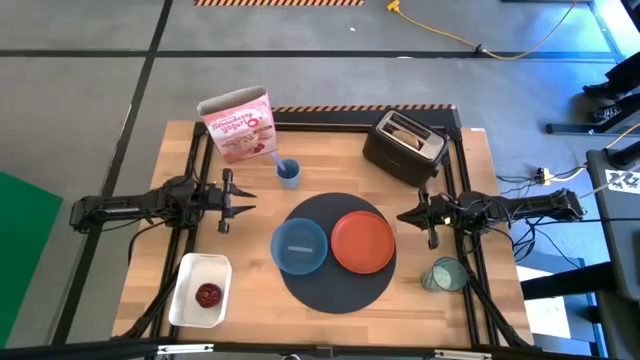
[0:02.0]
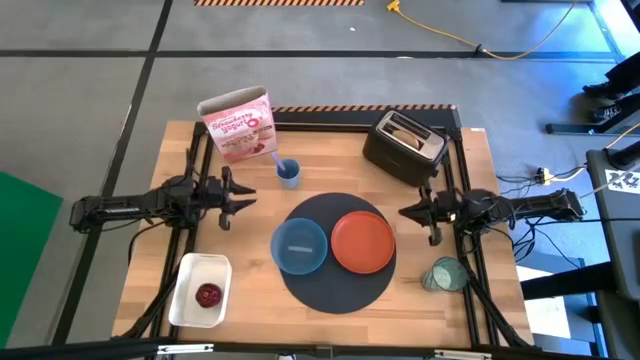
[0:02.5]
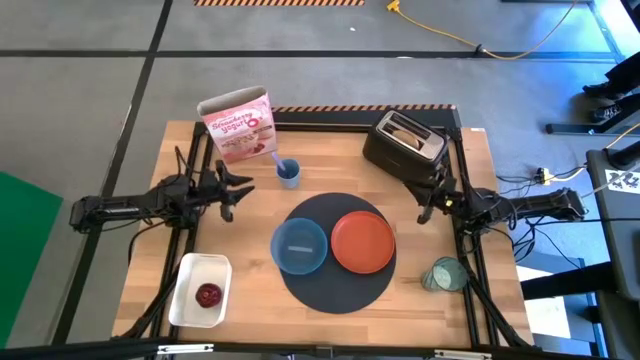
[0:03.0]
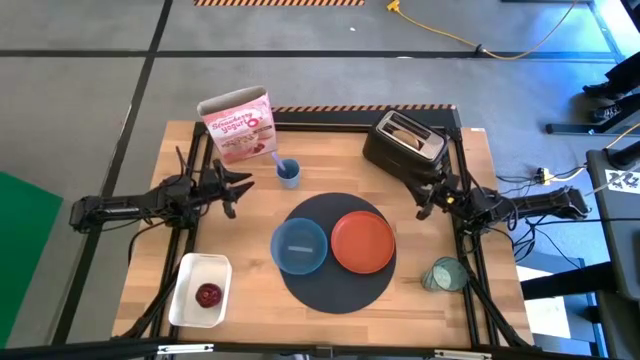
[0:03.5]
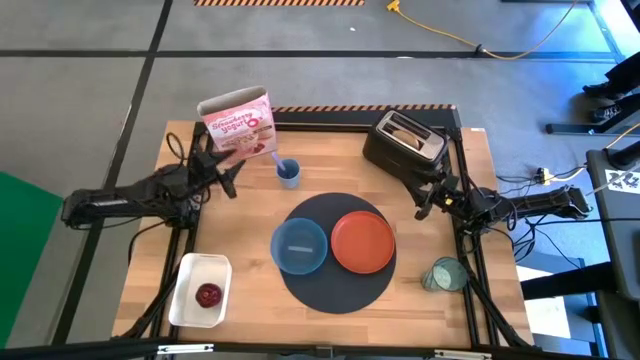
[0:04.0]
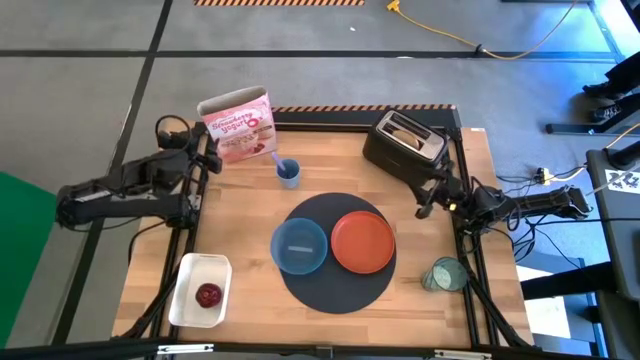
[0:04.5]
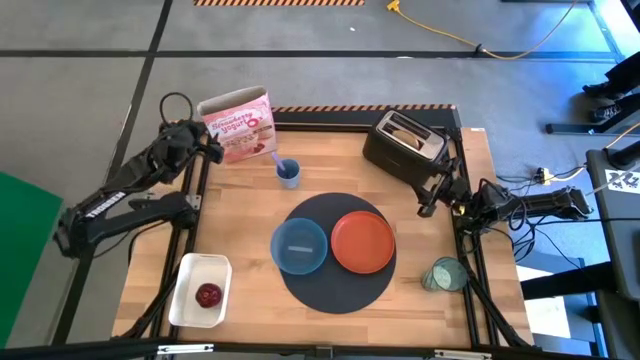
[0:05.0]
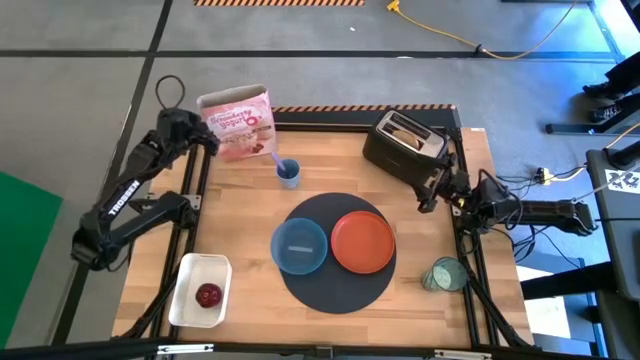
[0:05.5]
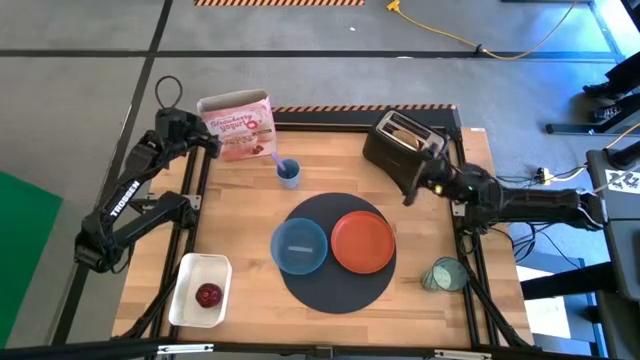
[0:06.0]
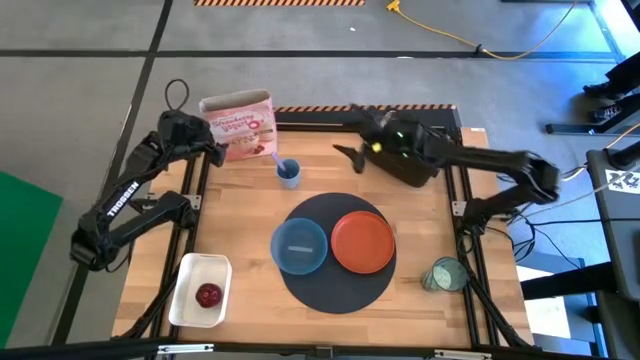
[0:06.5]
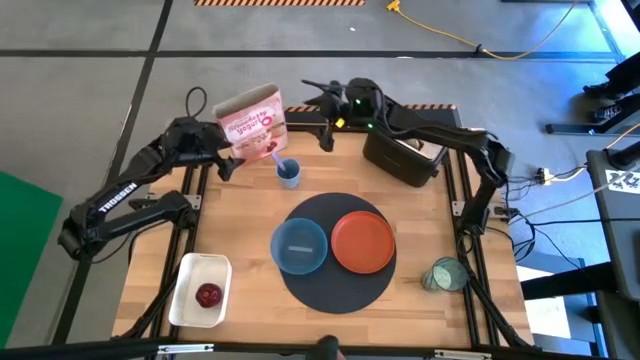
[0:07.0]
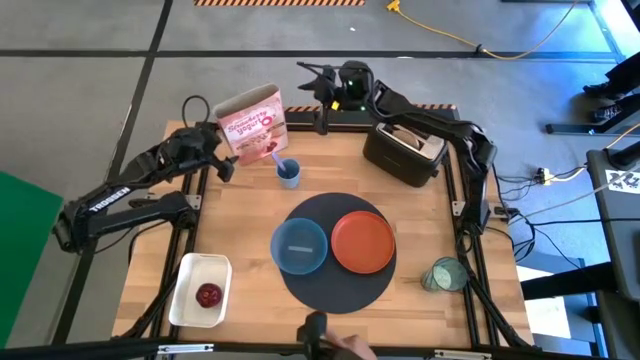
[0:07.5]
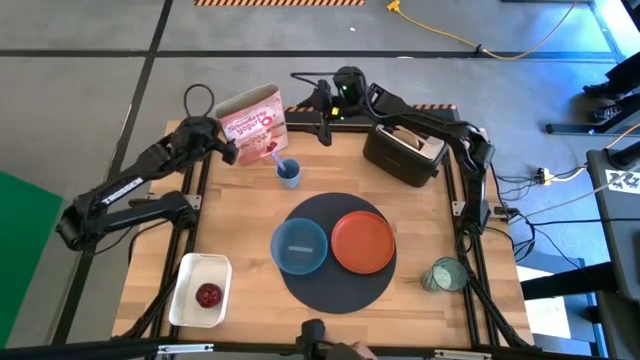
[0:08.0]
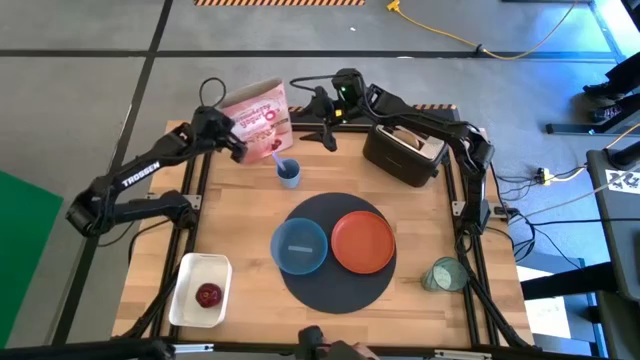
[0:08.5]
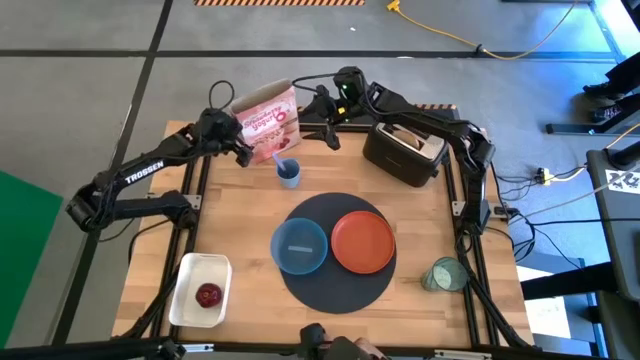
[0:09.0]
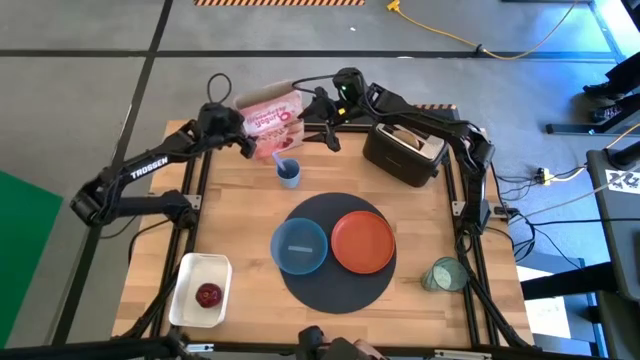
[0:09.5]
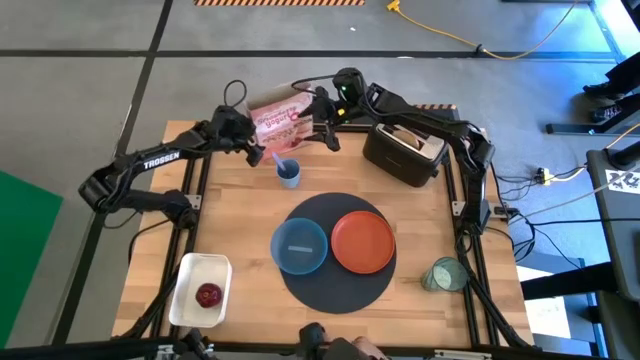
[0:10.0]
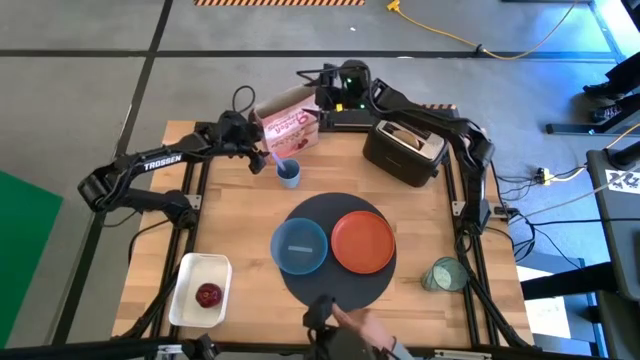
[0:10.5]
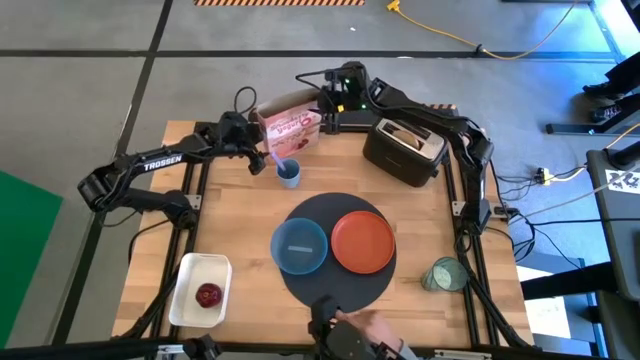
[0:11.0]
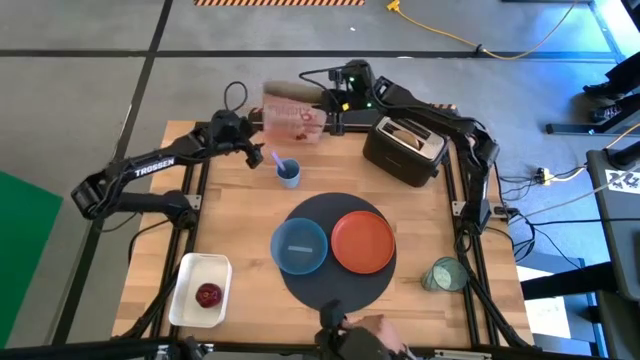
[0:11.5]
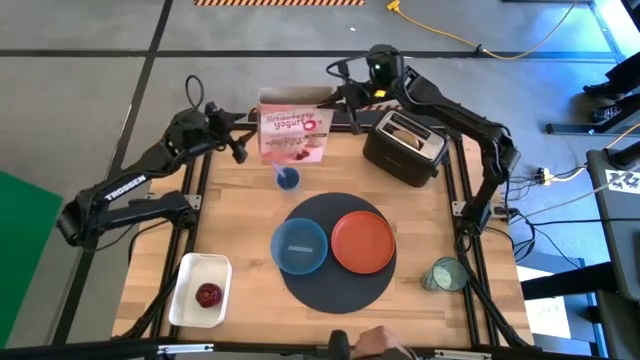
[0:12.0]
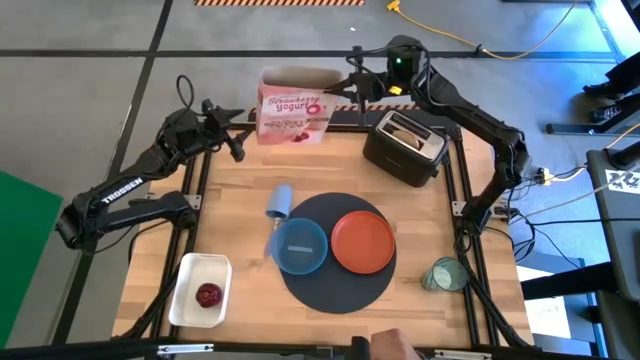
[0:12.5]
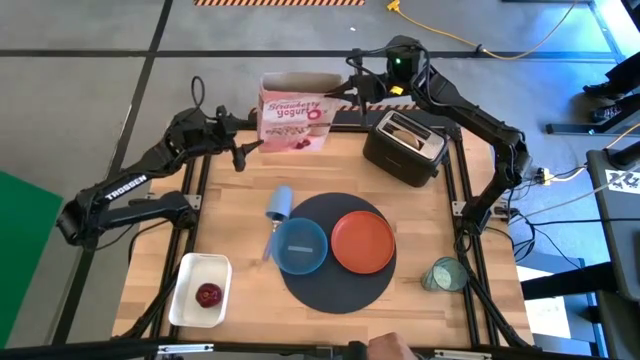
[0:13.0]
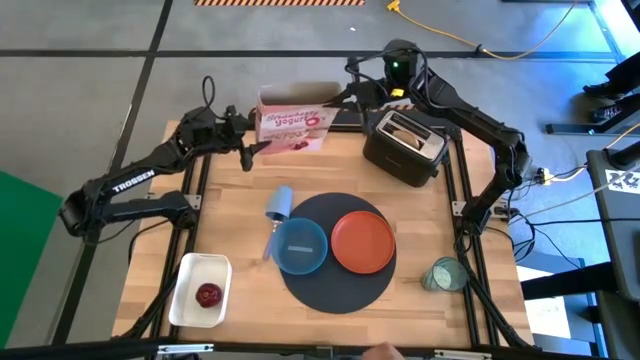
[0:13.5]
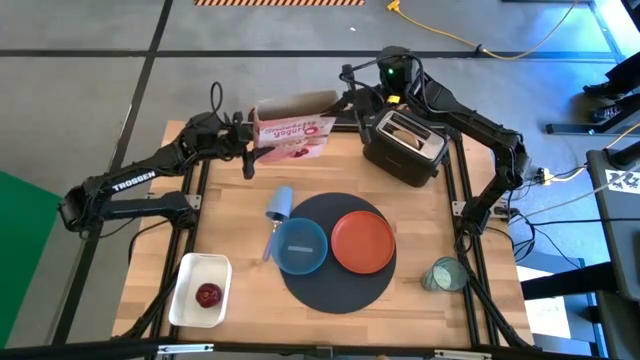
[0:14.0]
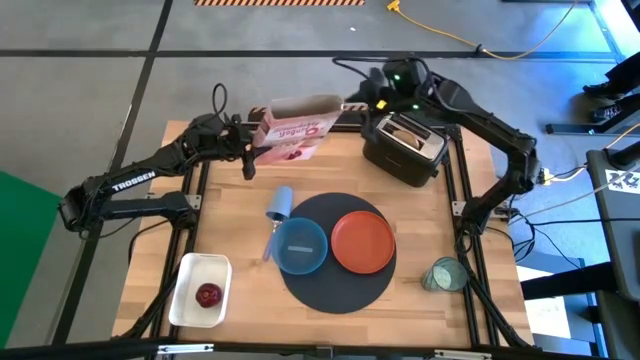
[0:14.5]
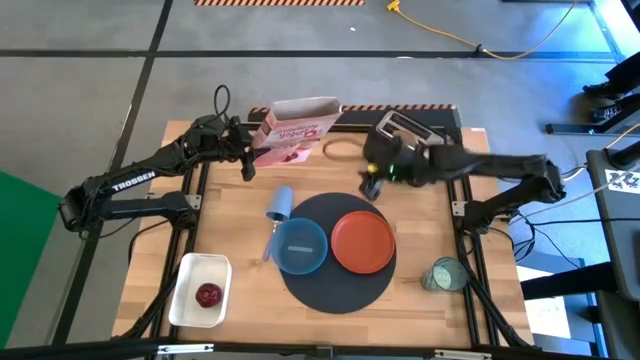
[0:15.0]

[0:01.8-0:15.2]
Task: Arrange a breakfast setting
Pour the cereal from the cereal box into the blue bowl

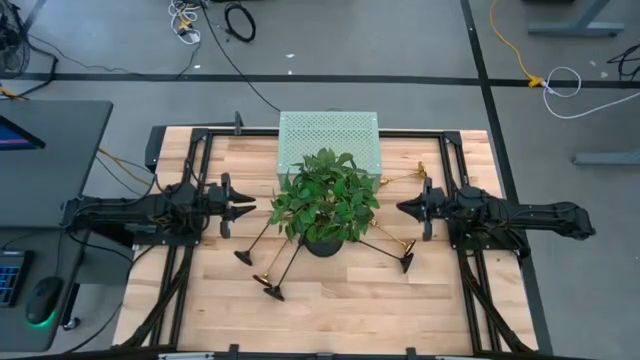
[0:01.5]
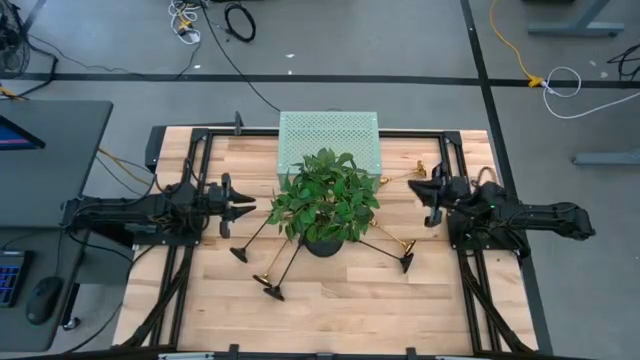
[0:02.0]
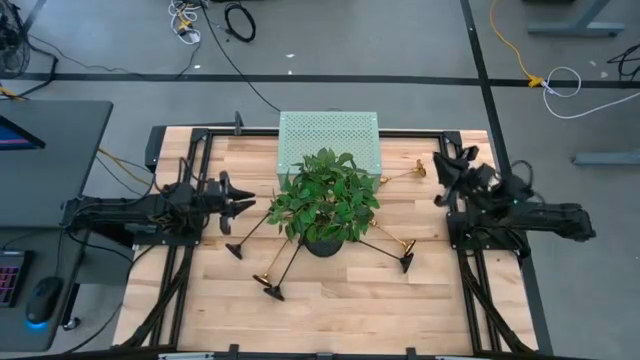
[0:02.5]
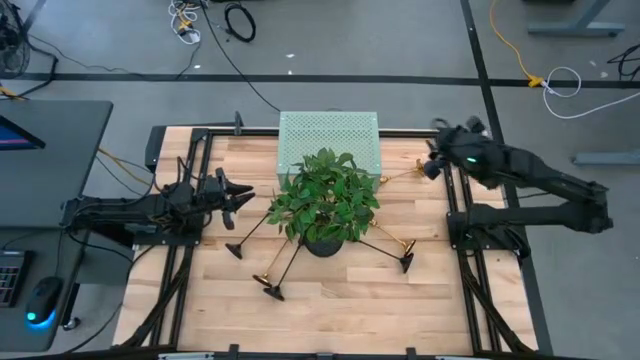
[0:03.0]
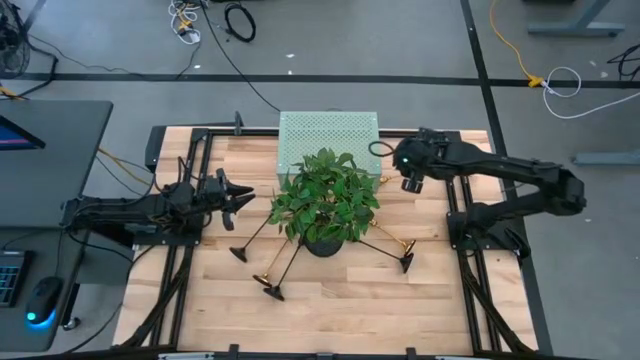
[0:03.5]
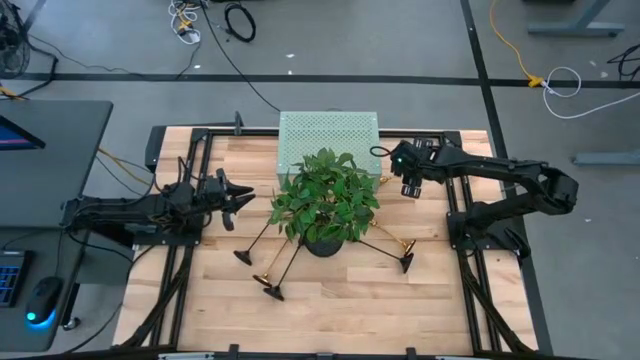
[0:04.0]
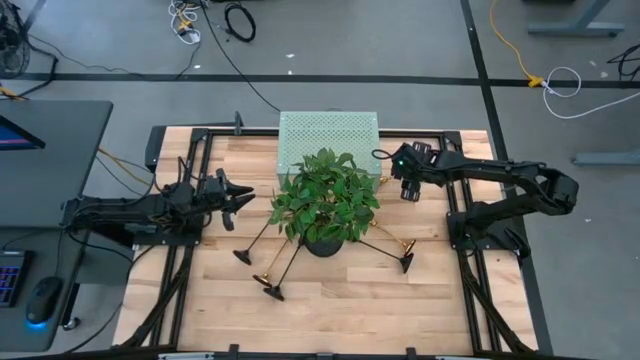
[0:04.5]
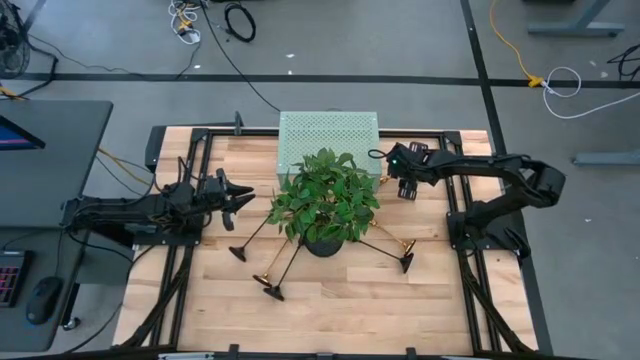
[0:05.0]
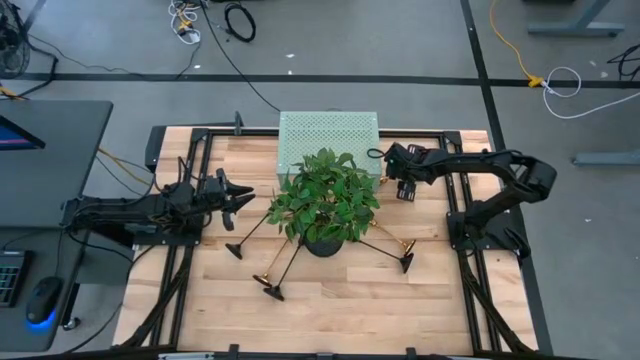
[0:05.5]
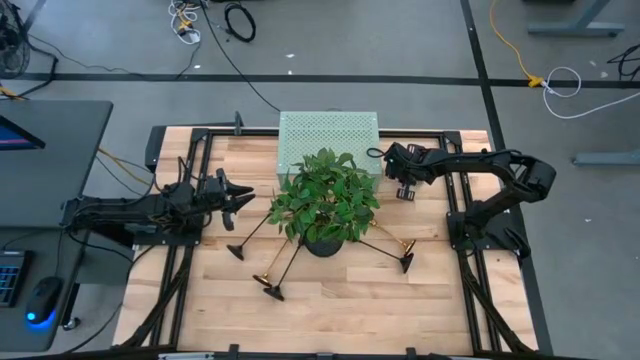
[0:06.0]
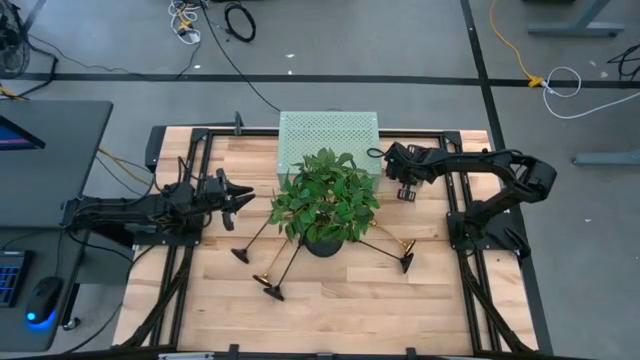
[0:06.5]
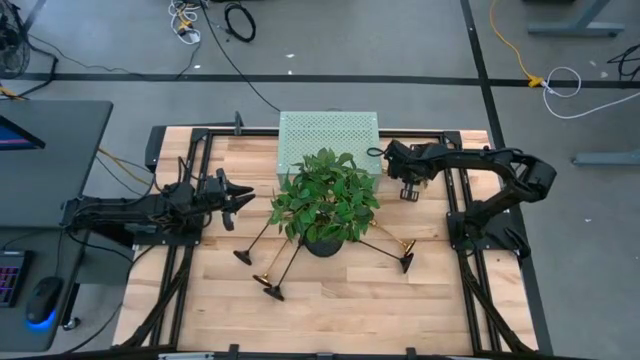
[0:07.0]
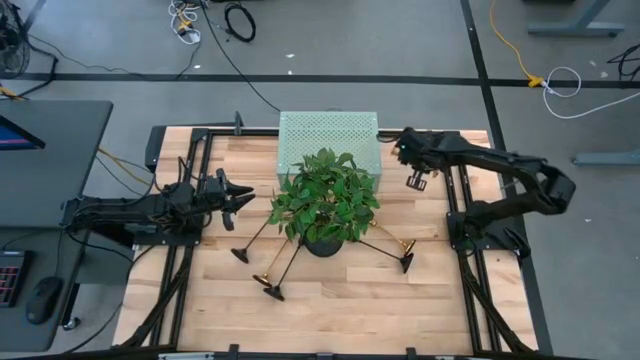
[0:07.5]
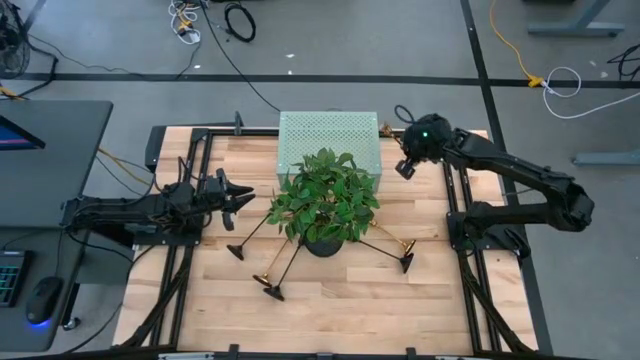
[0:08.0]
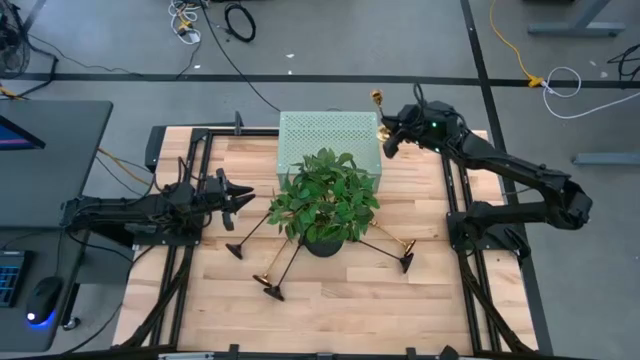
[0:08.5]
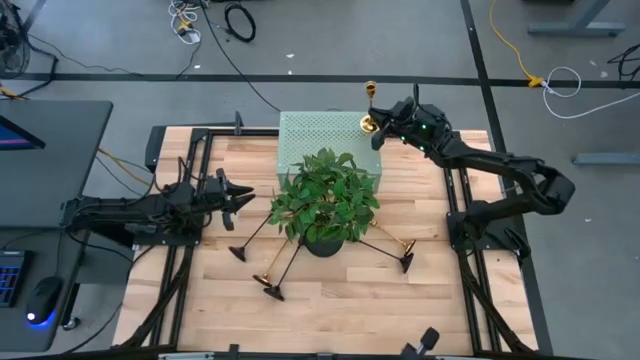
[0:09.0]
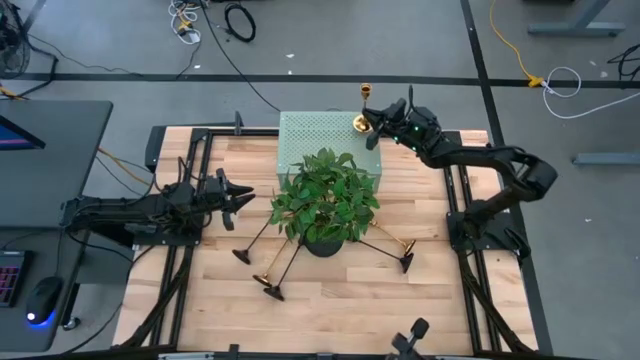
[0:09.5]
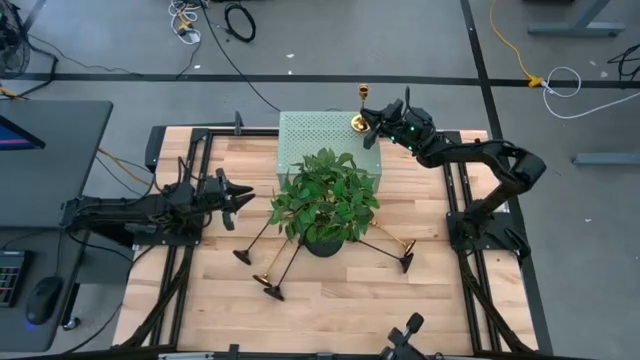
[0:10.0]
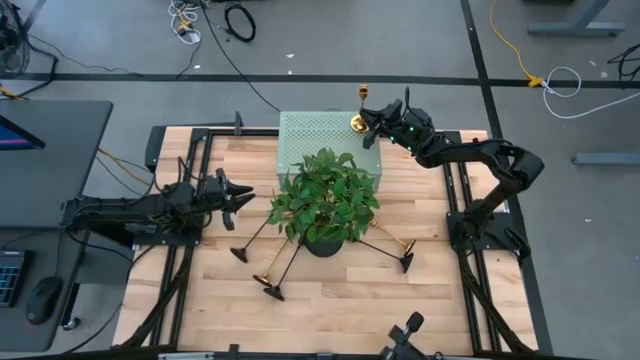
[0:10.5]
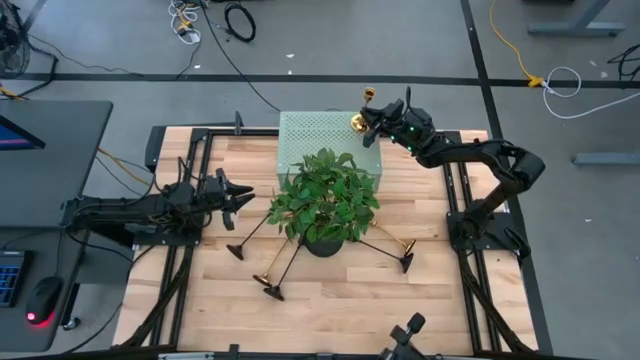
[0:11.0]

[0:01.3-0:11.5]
Task: Pick & Place candle stick holders
Put the top gold candle holder on the shelf
